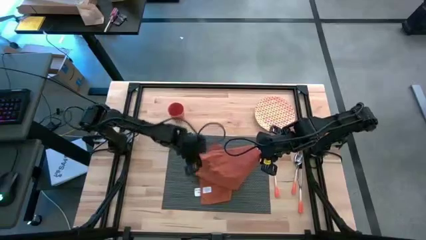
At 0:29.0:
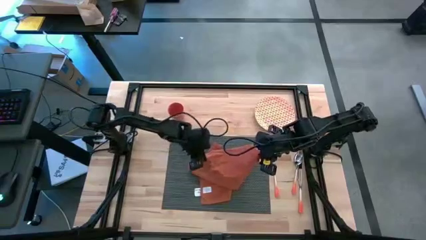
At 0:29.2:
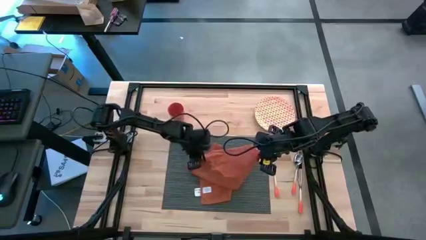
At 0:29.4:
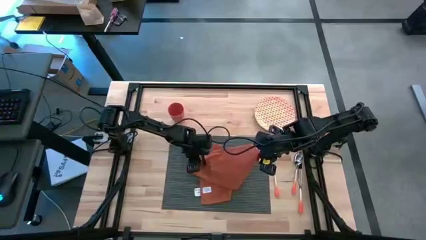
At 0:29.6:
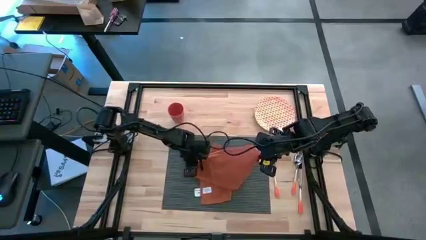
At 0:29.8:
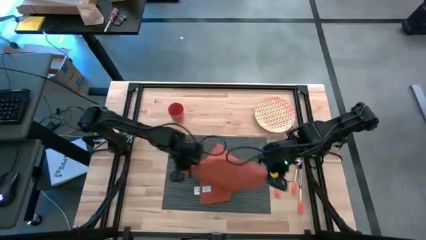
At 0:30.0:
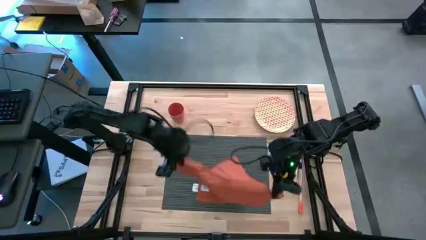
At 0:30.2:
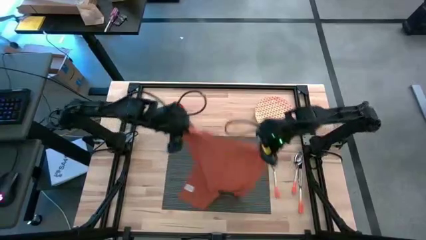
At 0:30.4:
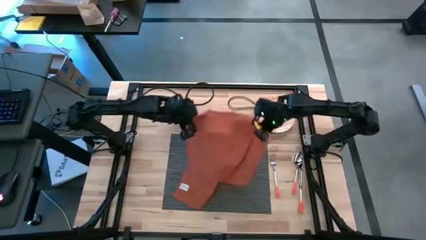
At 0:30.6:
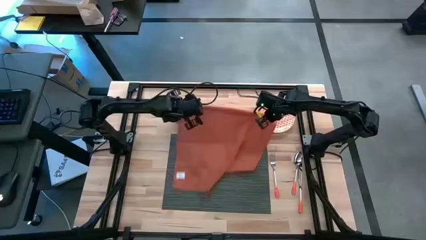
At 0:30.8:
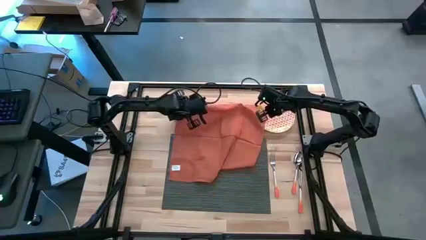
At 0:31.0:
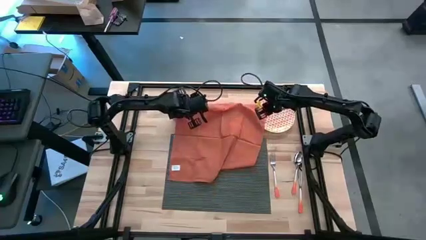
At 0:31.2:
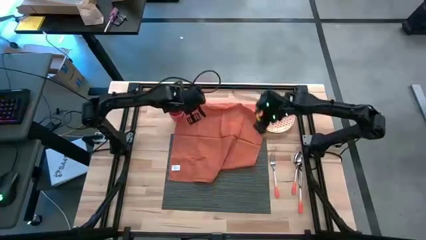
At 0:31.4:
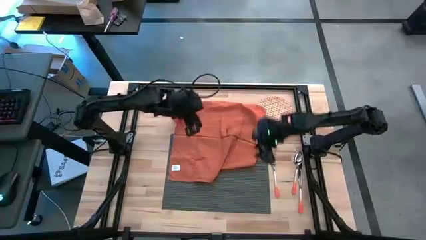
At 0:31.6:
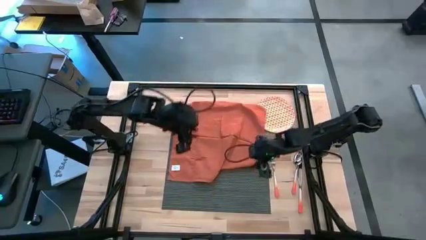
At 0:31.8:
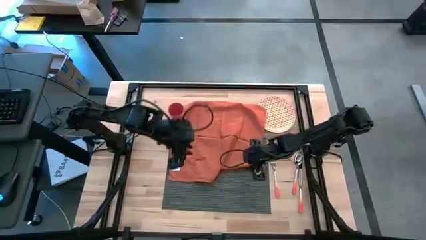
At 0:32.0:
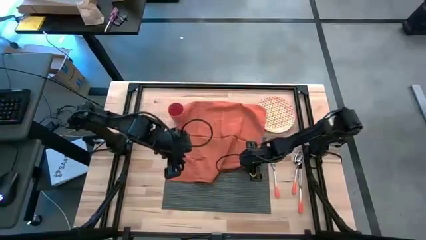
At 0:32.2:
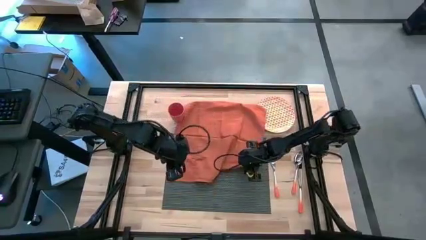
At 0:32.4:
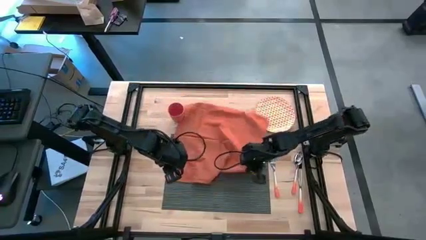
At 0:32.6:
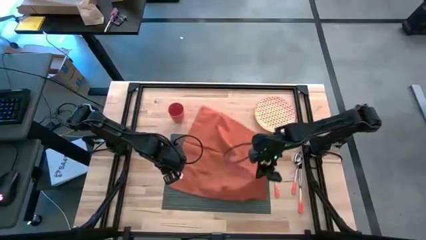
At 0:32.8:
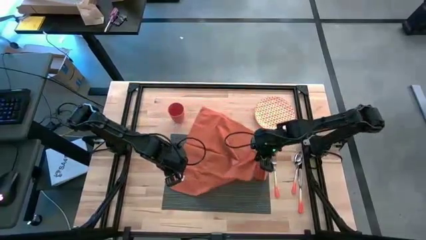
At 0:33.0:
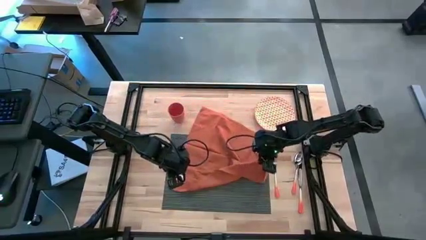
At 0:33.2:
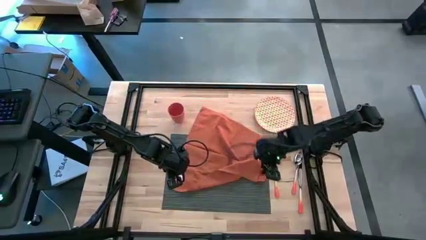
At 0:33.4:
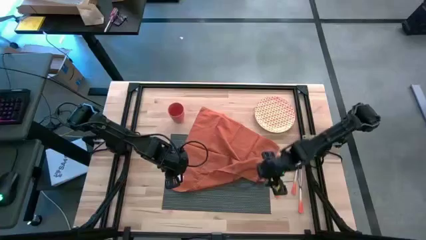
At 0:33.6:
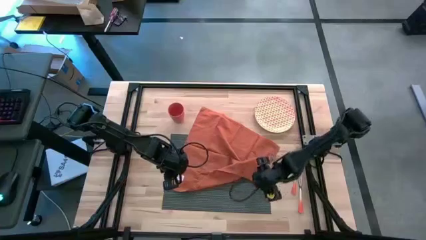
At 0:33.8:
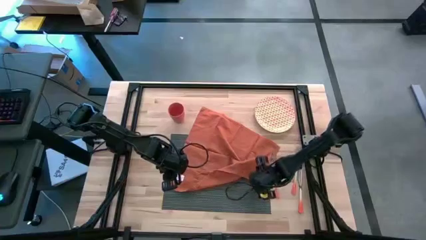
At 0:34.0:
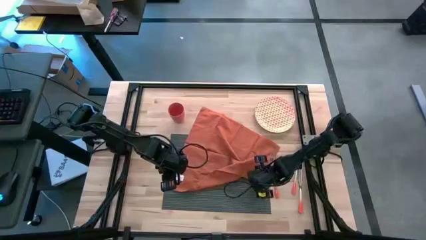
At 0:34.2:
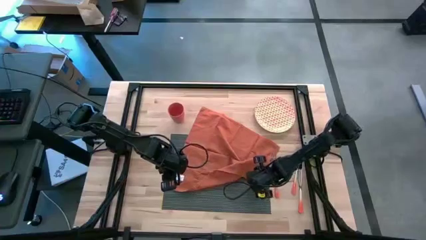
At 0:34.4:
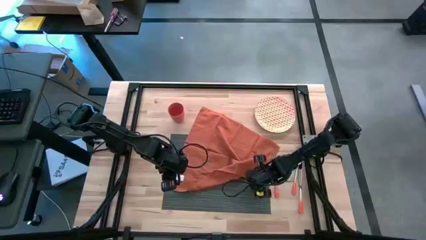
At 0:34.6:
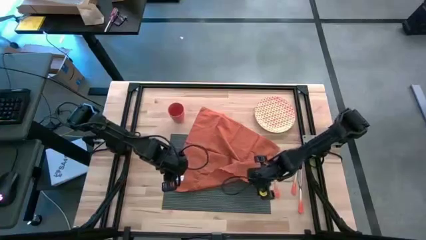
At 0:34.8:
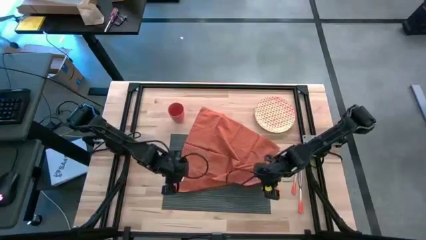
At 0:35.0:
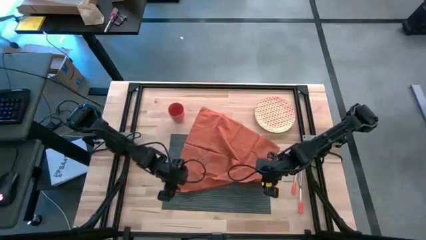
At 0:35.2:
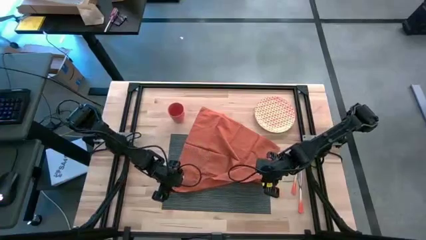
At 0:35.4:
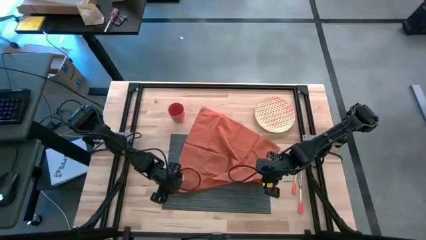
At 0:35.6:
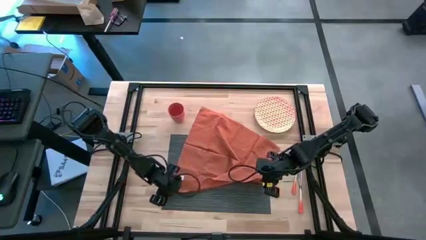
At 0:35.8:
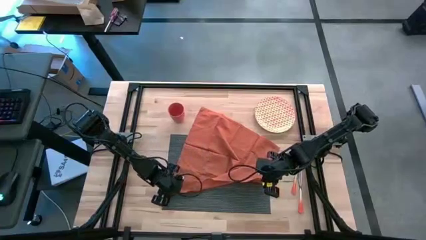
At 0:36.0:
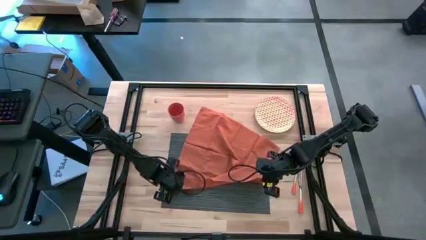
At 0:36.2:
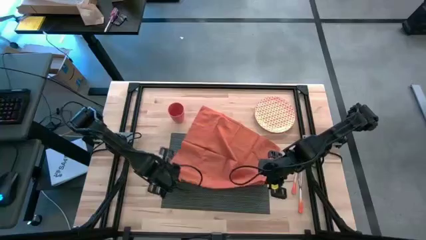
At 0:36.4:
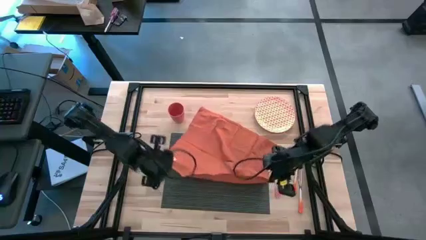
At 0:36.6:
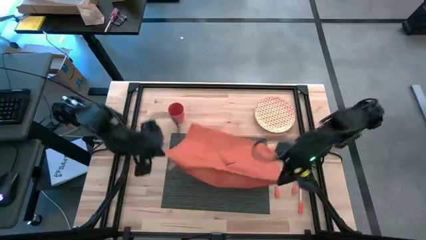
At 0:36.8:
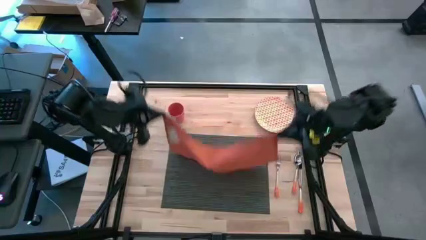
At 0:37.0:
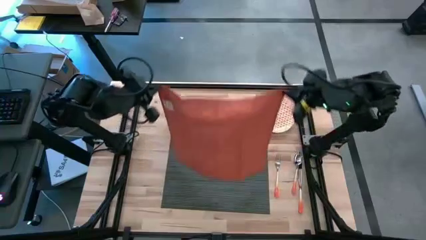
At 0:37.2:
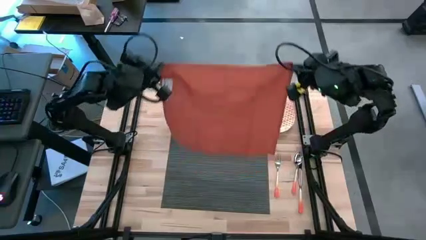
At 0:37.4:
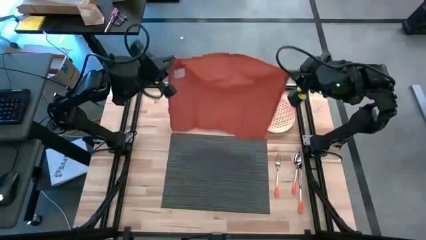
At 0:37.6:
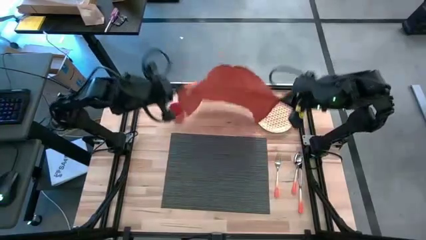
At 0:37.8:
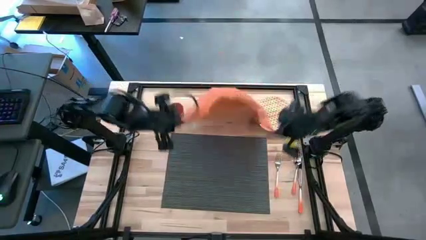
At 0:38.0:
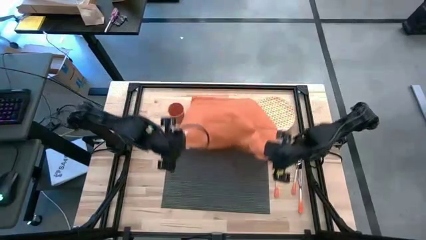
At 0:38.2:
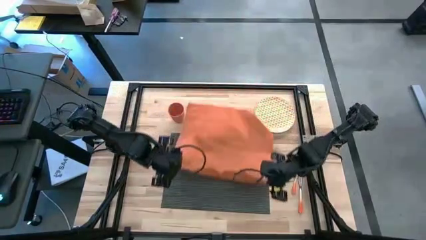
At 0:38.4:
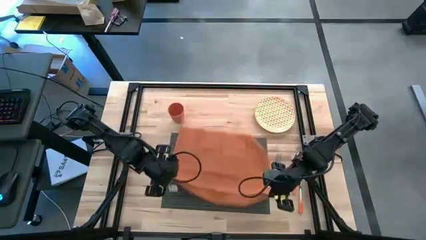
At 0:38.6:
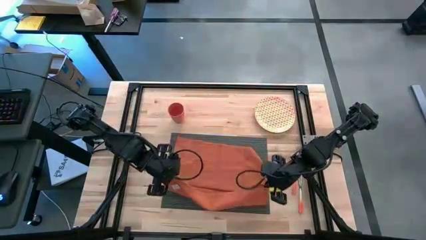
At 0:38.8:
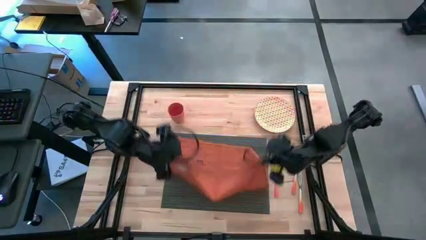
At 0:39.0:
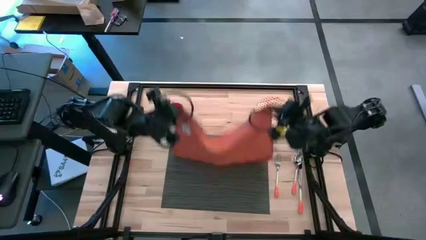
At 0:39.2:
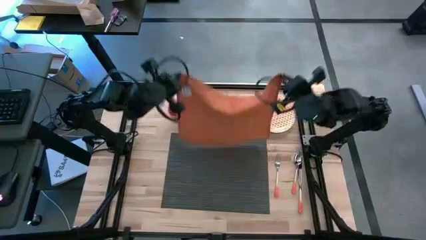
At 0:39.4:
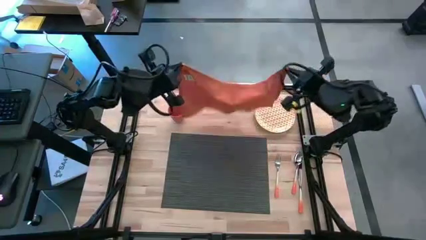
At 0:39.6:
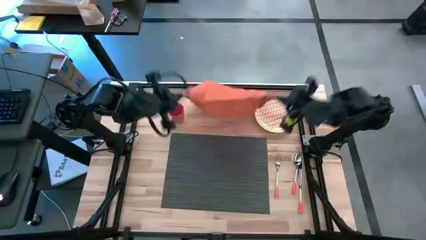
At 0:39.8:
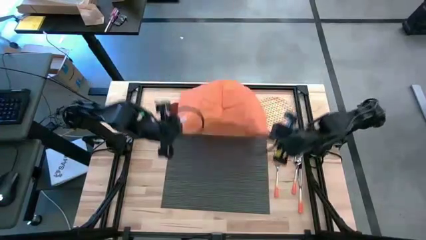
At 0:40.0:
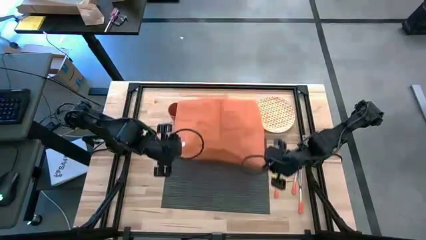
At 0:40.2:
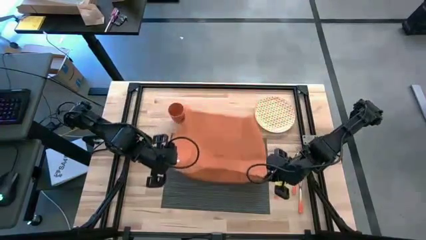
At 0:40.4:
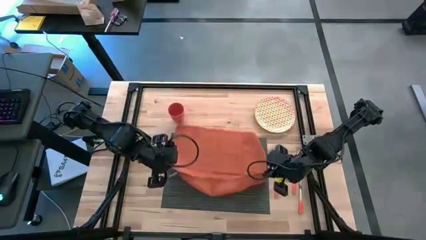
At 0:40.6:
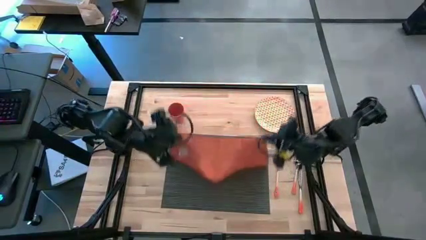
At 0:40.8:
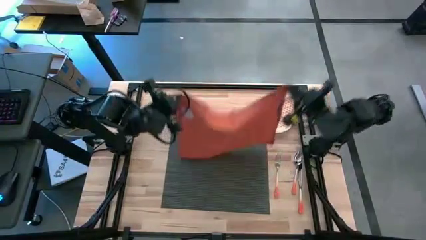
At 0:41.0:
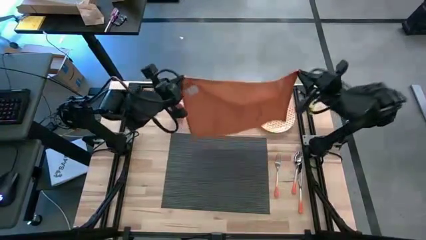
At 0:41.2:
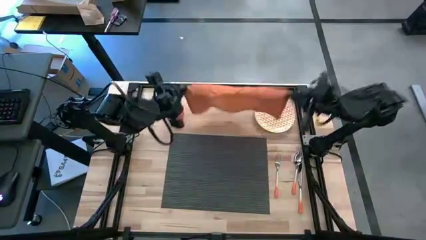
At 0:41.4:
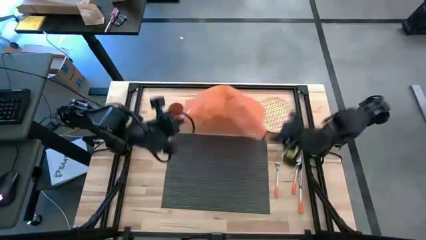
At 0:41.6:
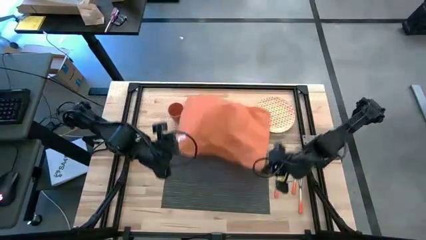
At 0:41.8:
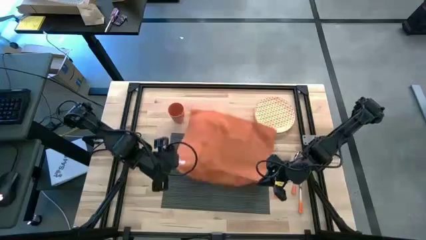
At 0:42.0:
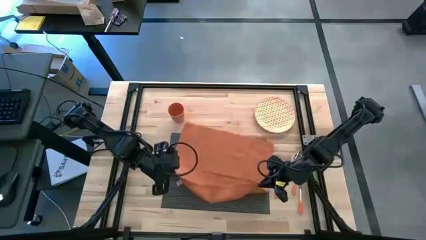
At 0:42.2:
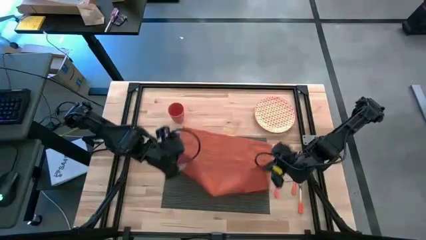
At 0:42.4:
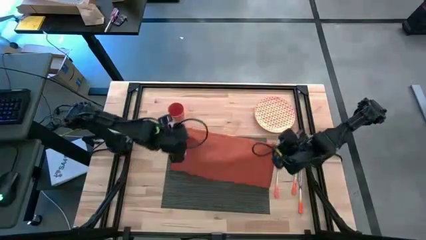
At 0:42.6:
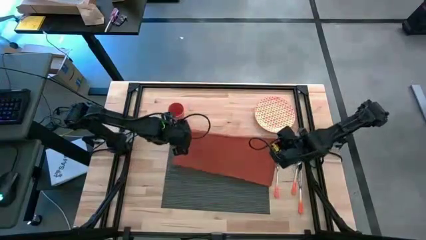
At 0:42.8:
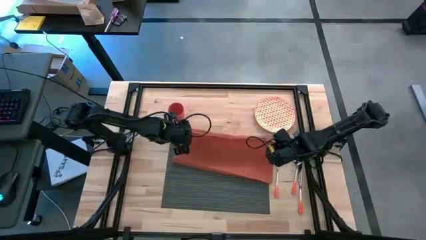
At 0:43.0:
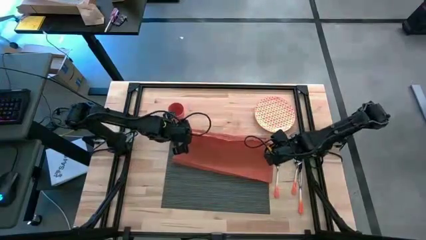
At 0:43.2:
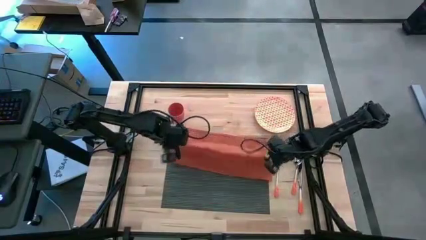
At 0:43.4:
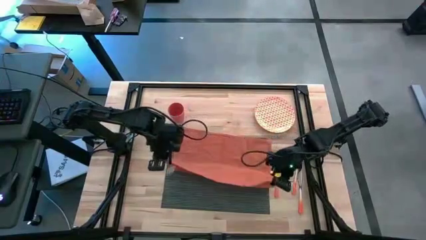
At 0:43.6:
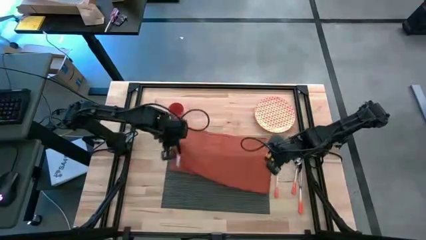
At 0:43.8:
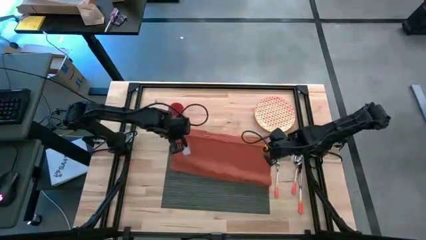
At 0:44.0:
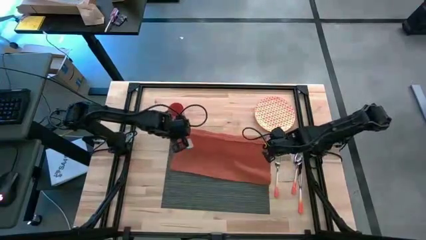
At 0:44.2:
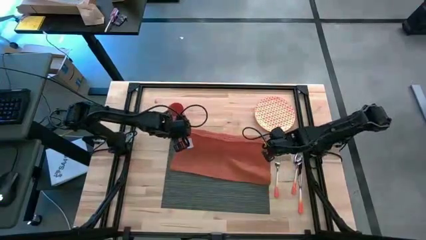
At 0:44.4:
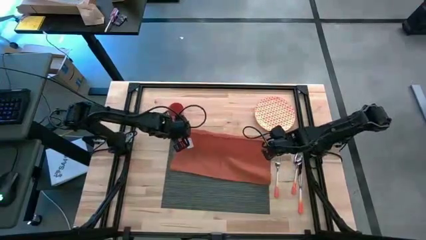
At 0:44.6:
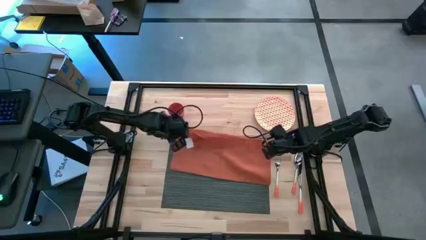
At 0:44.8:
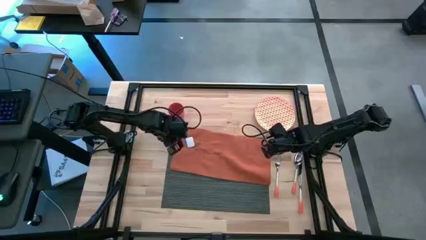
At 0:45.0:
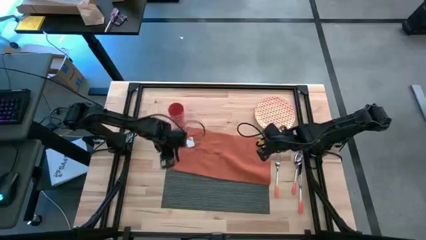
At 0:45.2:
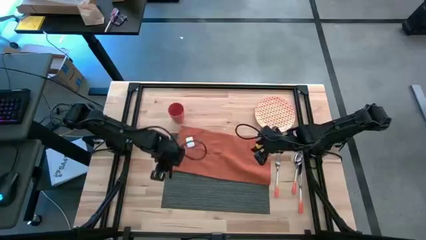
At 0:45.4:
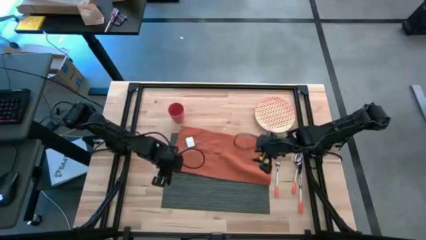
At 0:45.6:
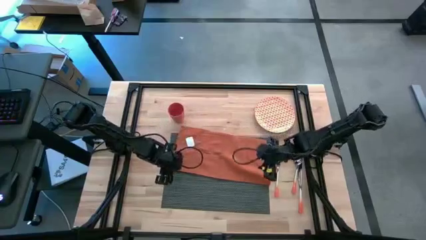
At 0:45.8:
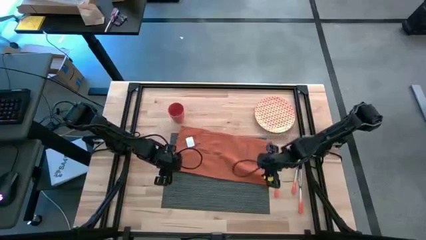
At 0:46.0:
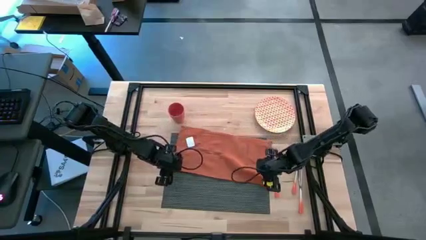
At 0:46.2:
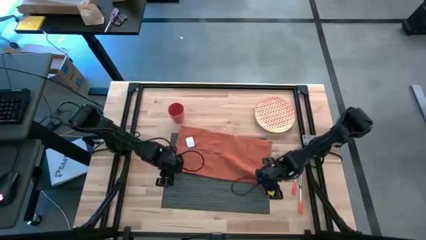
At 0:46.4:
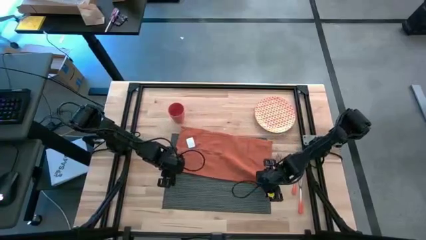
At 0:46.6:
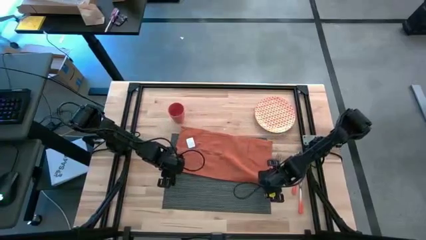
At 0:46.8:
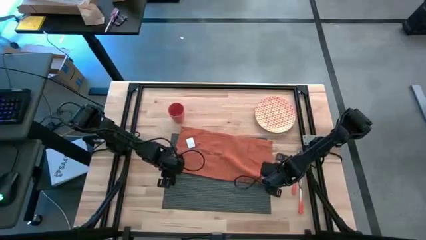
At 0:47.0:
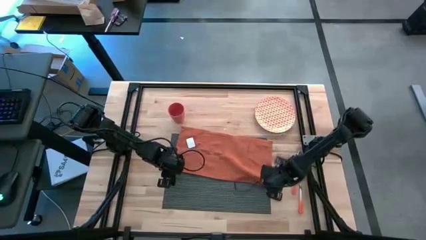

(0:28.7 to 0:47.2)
Task: Set table place
Fold the orange table napkin
